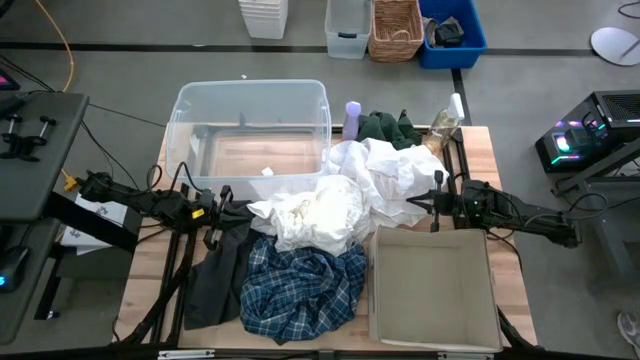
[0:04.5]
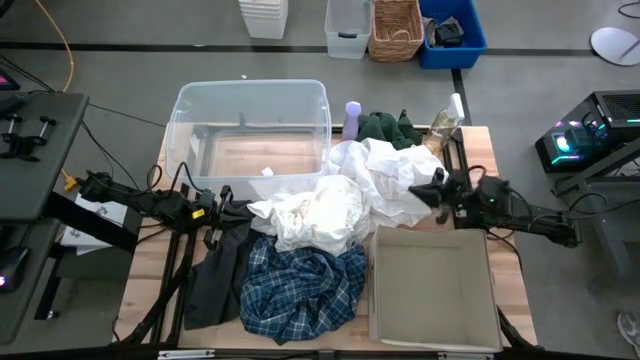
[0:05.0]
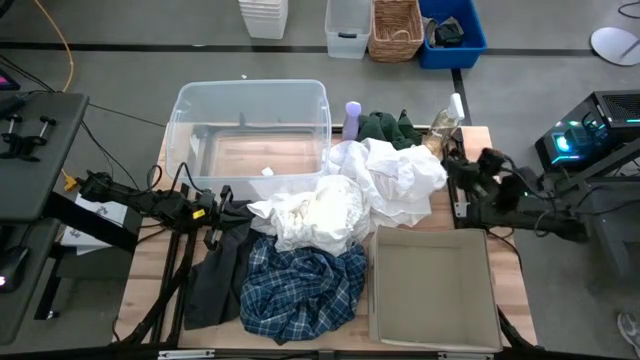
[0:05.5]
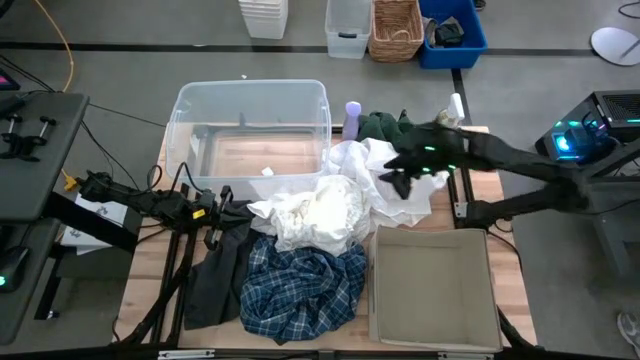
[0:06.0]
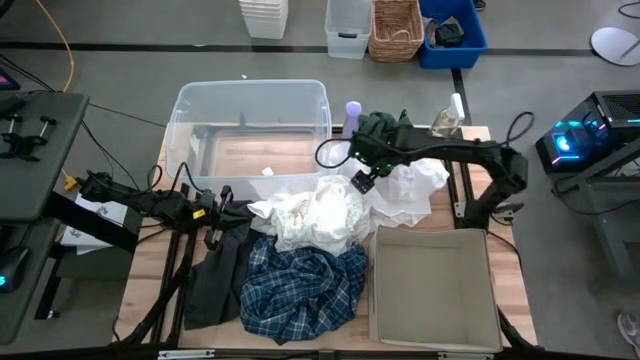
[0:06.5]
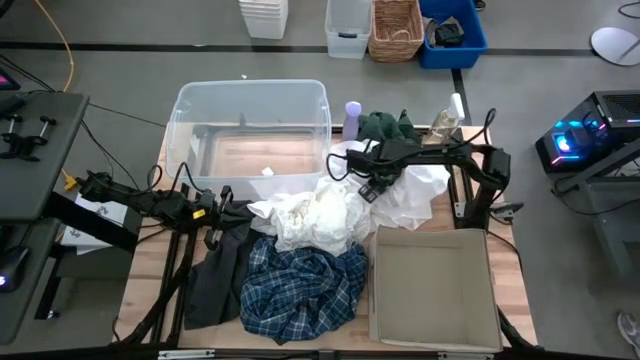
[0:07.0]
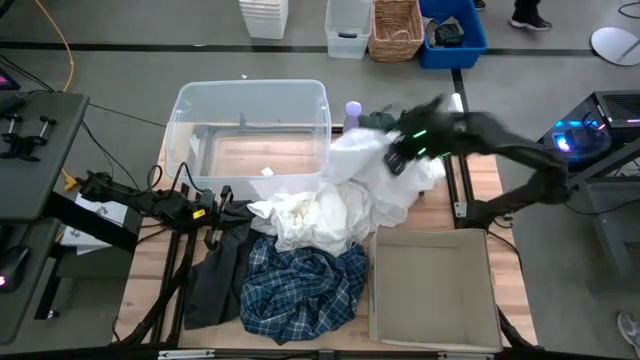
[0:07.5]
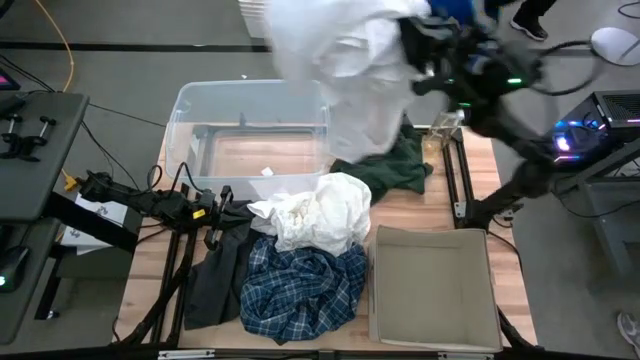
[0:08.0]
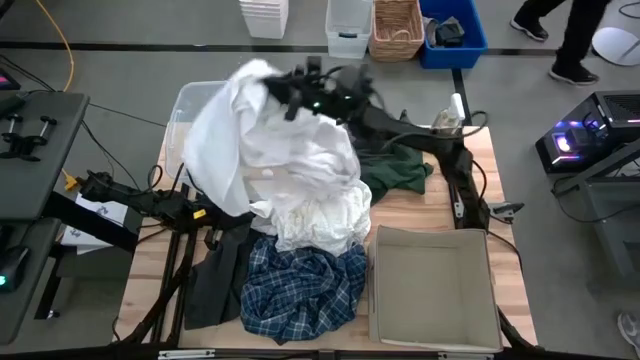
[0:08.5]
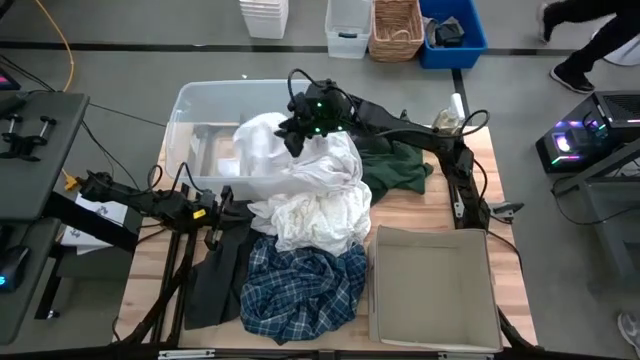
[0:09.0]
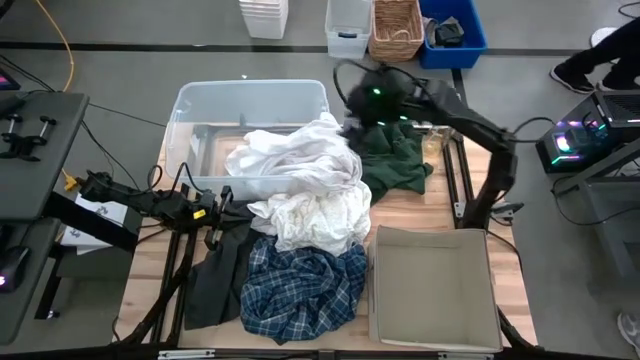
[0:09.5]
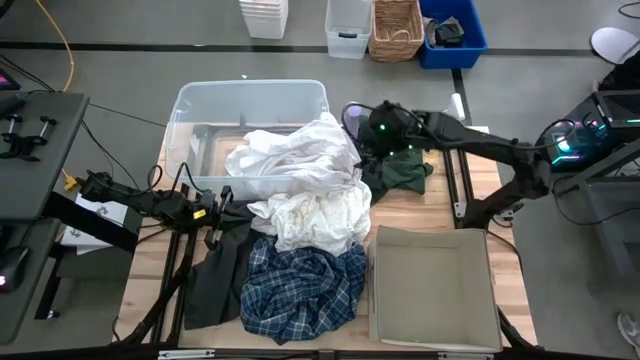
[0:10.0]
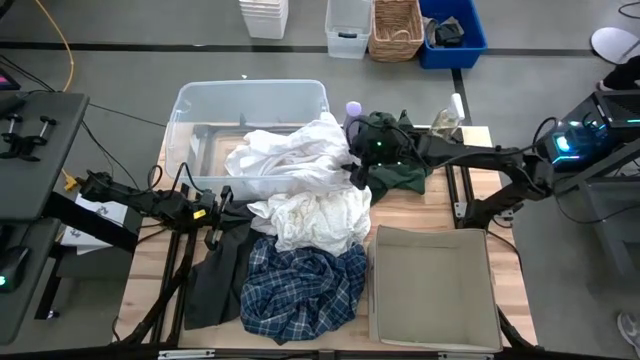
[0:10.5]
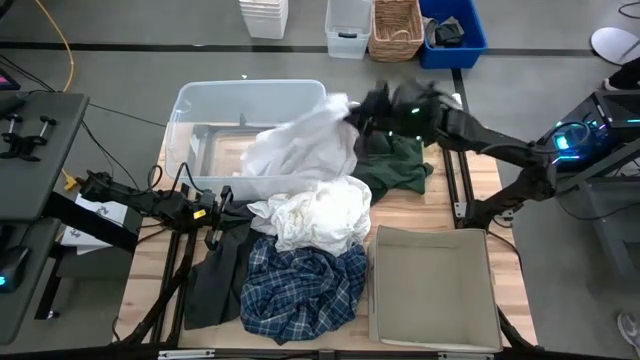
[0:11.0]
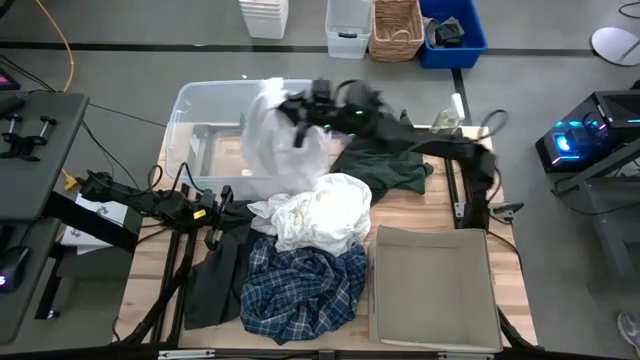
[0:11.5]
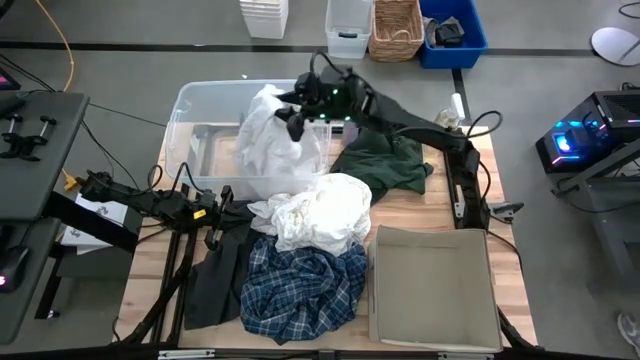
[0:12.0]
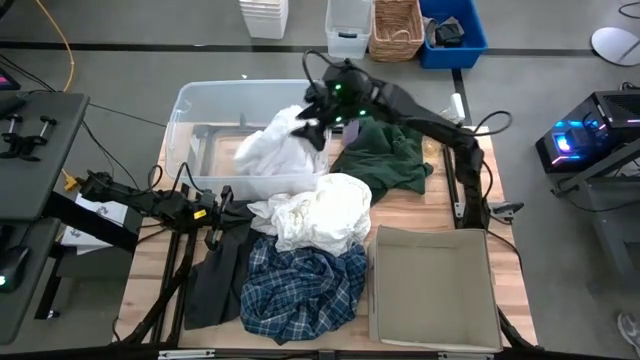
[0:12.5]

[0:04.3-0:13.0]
Task: Sort clothes
Put the top white towel into the transparent bin

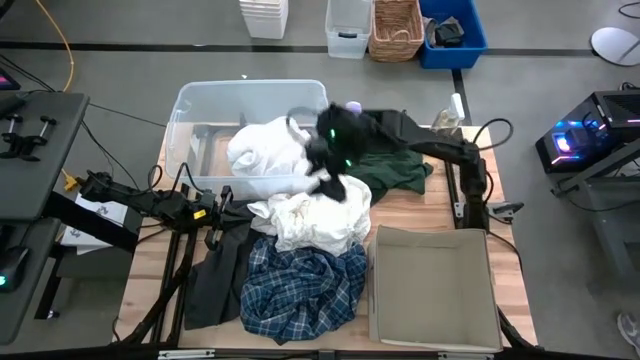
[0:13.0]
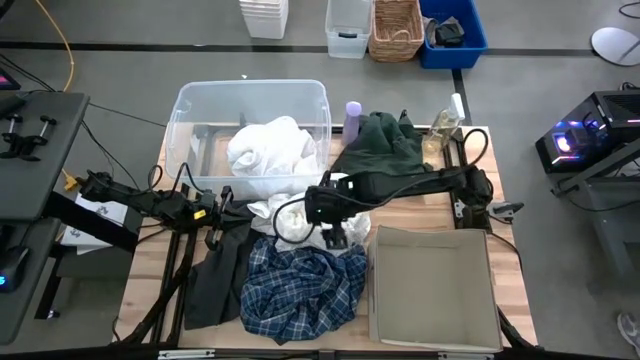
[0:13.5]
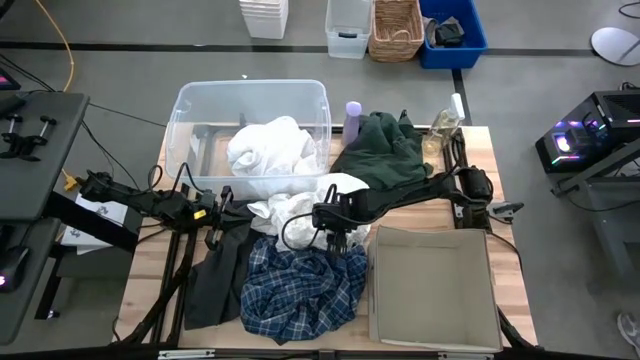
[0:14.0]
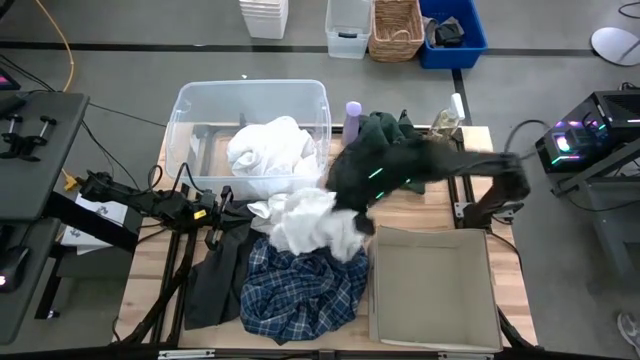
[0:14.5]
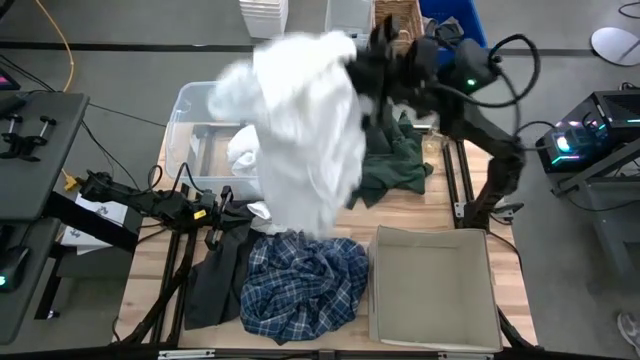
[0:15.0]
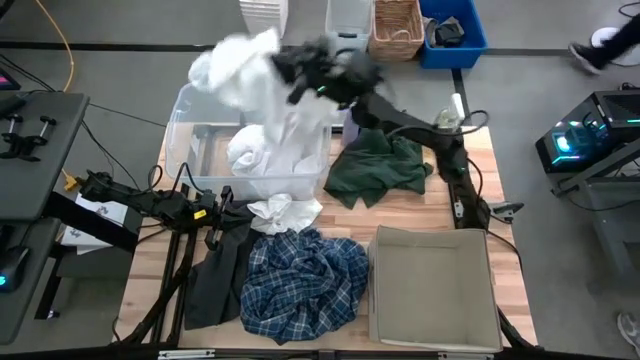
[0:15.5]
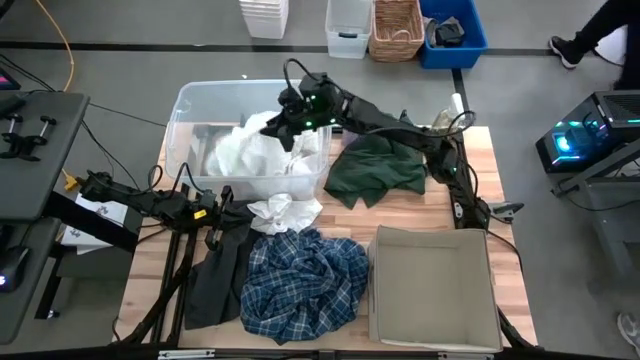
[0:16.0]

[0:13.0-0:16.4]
Put the white towel into the transparent bin

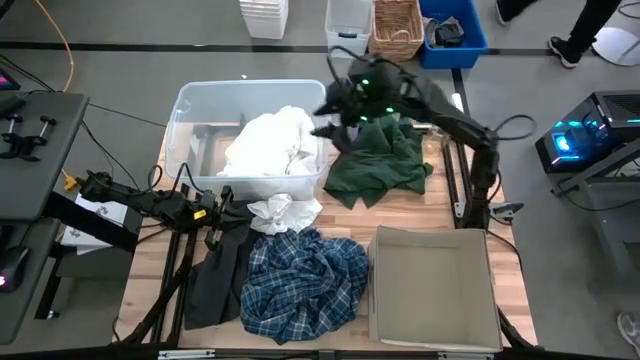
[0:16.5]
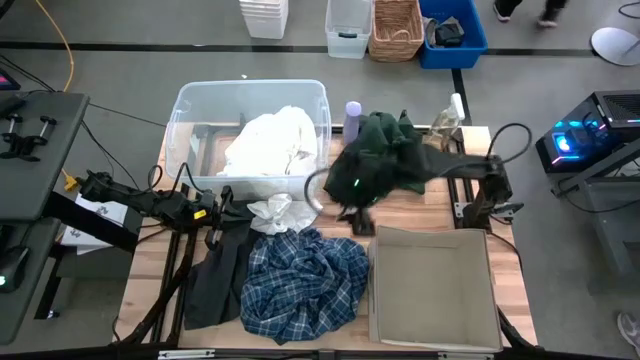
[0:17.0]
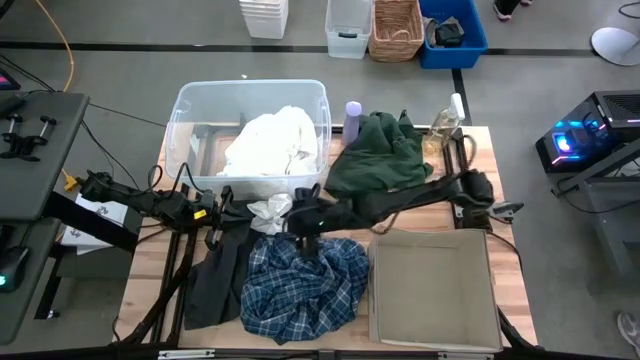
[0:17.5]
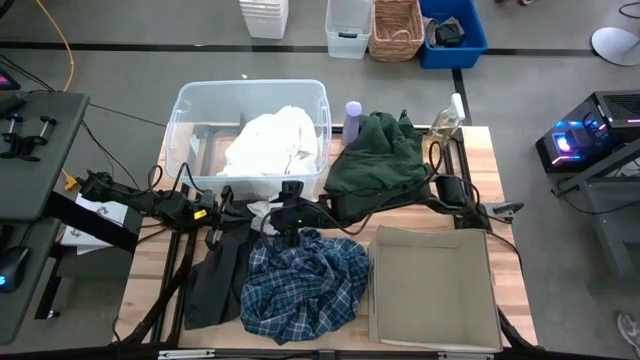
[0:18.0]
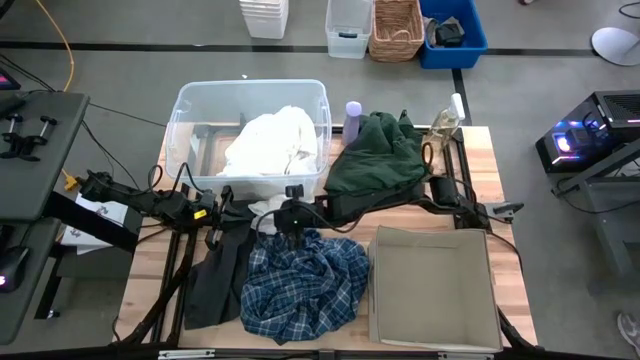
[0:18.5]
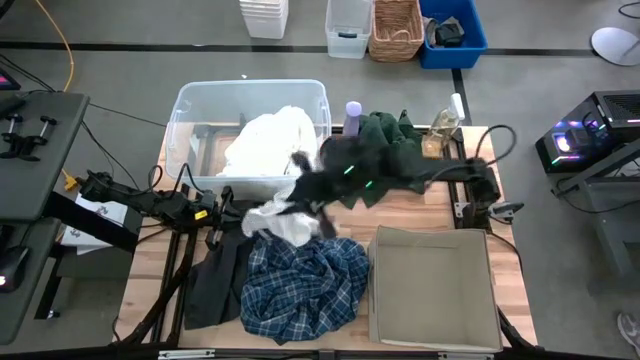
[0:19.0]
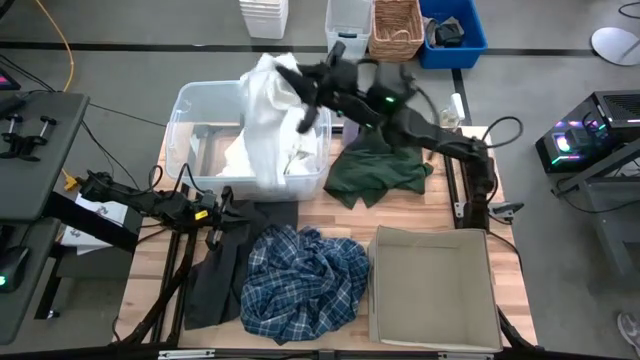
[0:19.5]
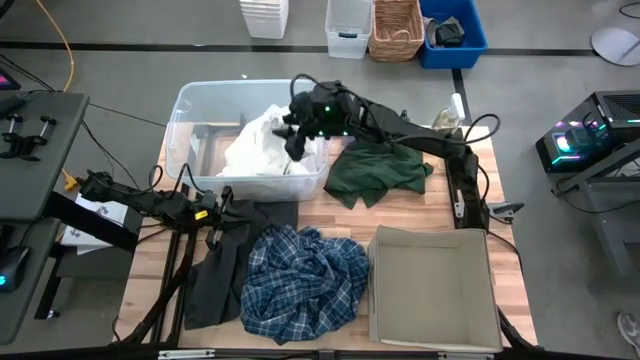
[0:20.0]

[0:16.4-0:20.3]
Put the white handkerchief into the transparent bin

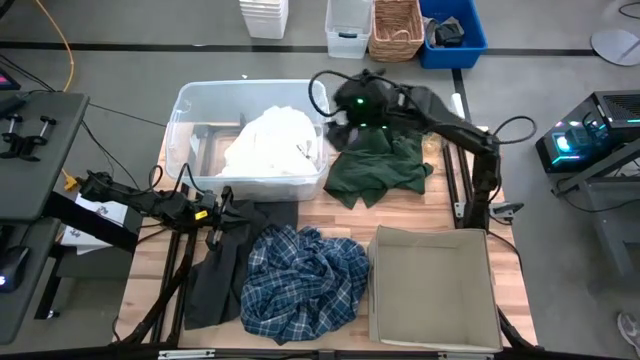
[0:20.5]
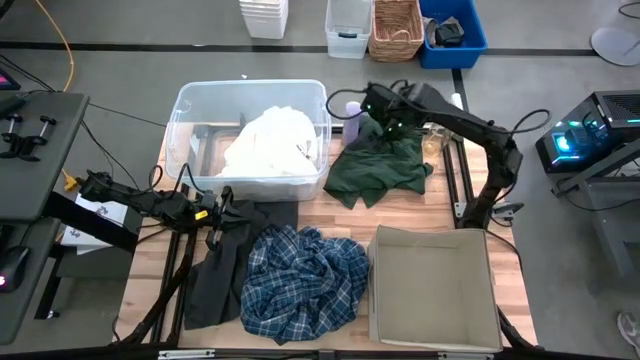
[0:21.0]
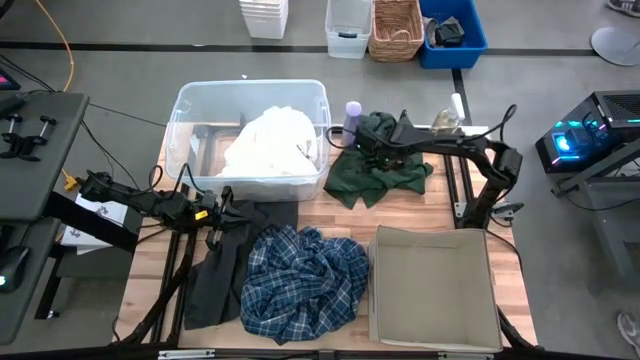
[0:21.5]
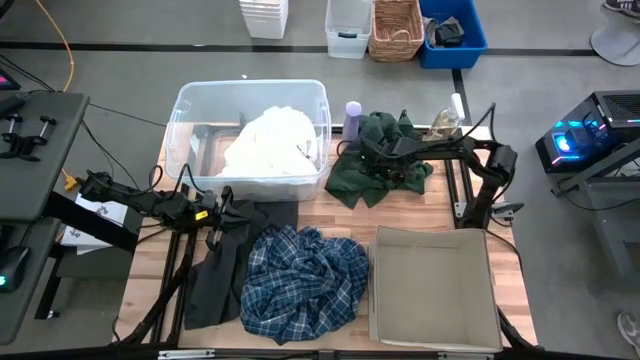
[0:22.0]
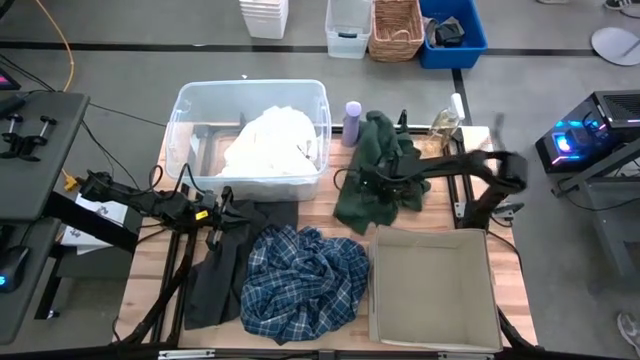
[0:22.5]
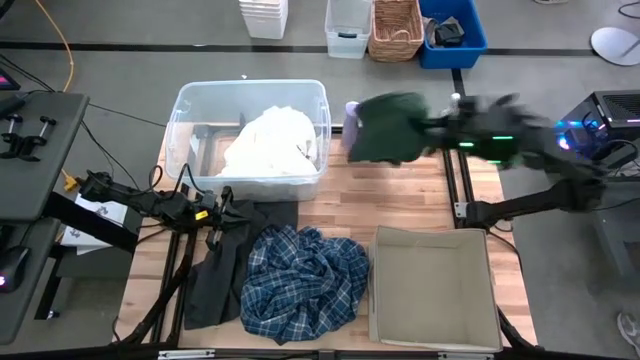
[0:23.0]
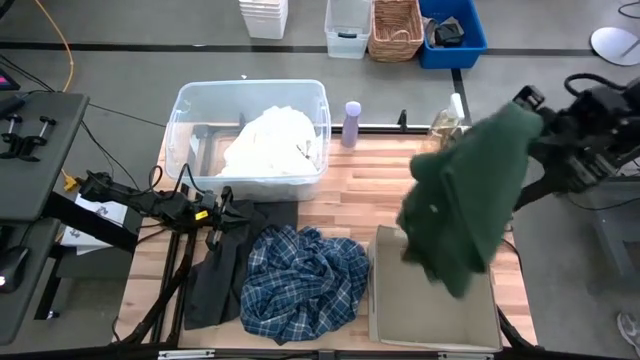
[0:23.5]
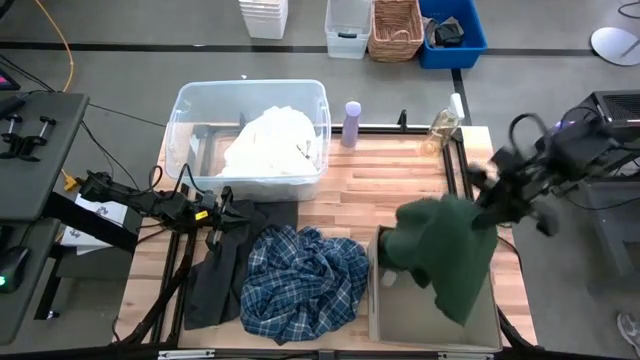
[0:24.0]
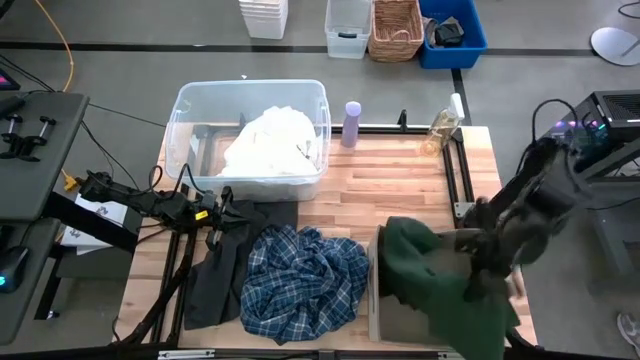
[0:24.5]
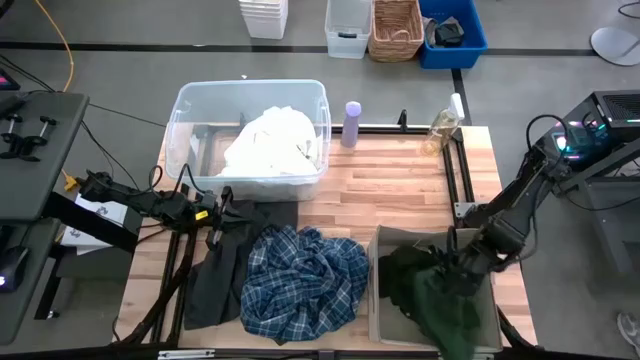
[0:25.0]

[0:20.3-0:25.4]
Put the green shirt into the brown bin
